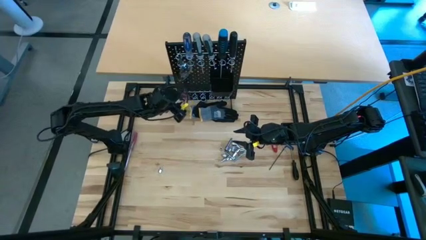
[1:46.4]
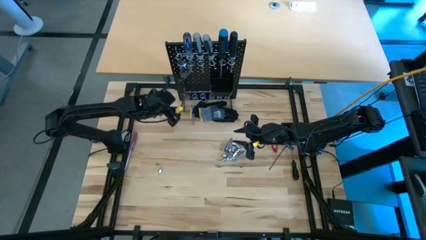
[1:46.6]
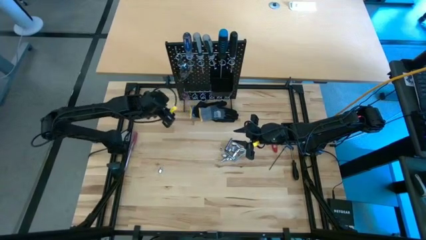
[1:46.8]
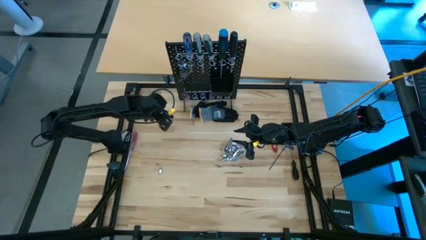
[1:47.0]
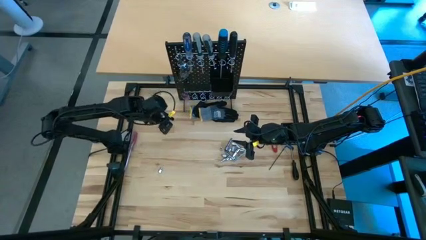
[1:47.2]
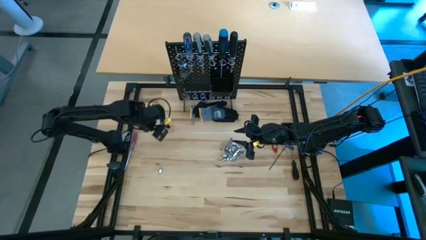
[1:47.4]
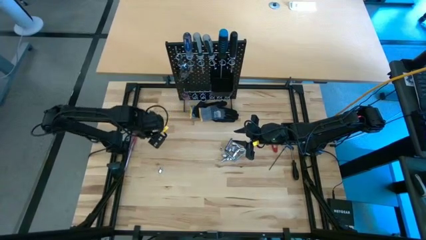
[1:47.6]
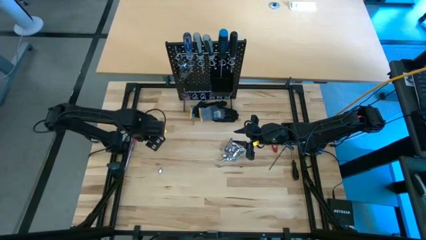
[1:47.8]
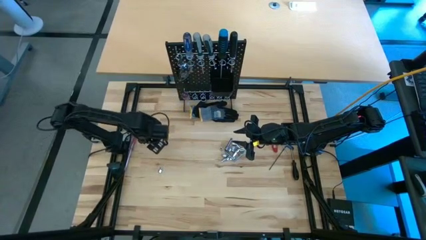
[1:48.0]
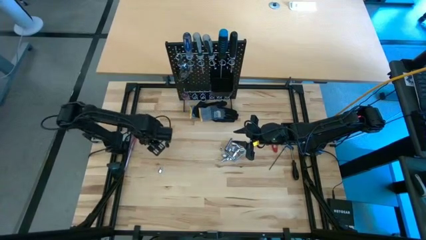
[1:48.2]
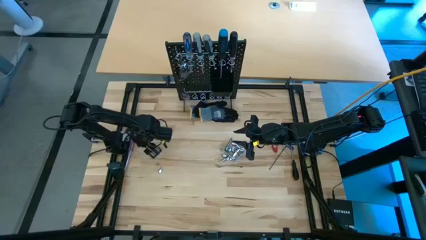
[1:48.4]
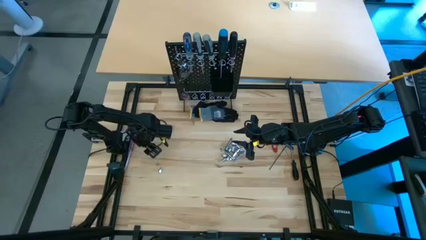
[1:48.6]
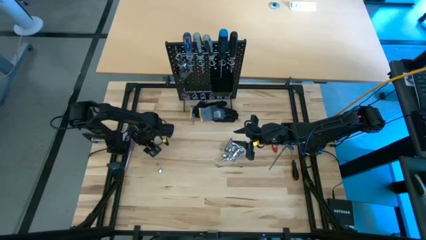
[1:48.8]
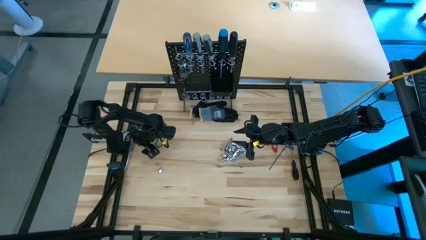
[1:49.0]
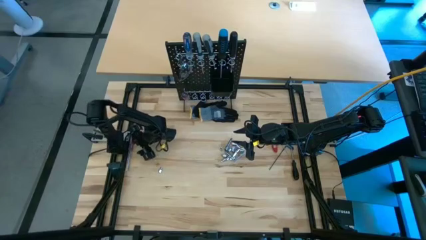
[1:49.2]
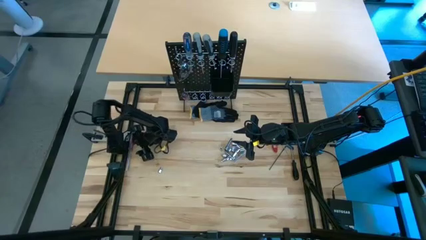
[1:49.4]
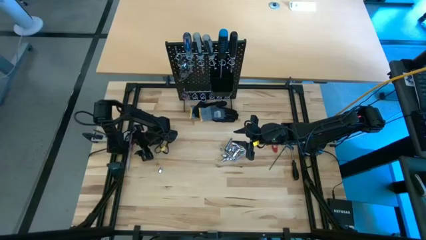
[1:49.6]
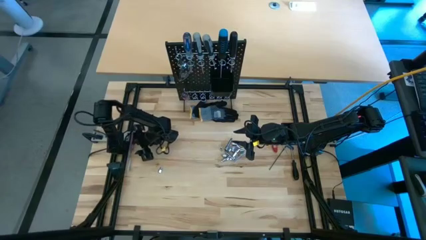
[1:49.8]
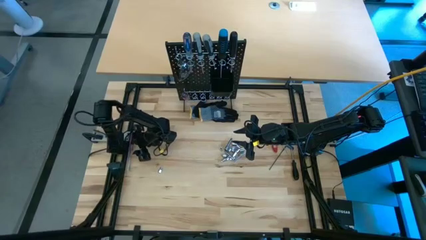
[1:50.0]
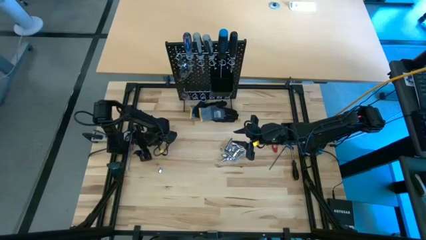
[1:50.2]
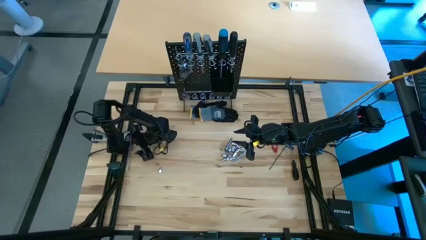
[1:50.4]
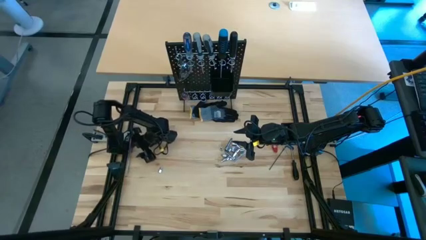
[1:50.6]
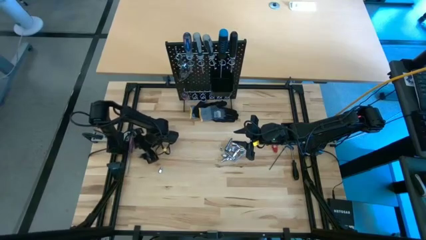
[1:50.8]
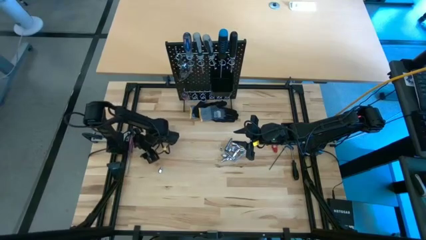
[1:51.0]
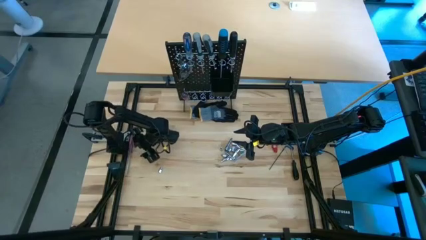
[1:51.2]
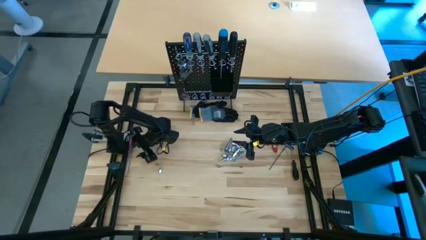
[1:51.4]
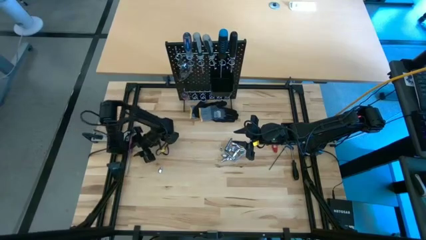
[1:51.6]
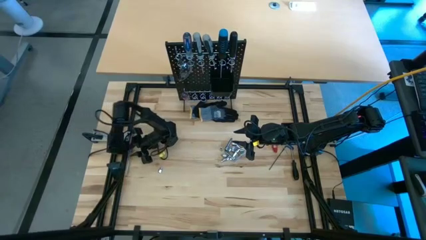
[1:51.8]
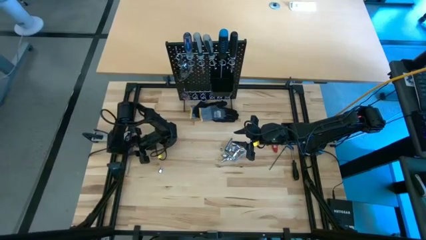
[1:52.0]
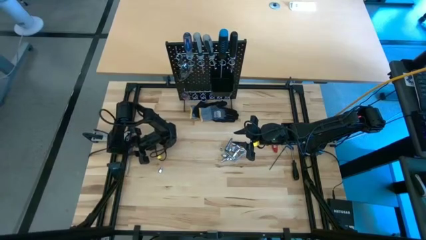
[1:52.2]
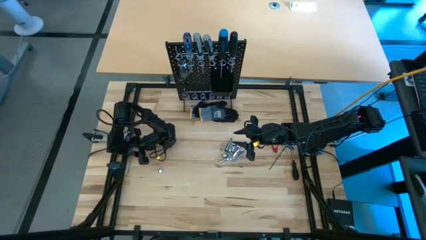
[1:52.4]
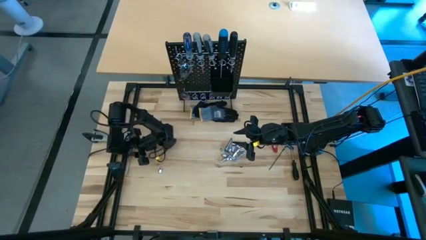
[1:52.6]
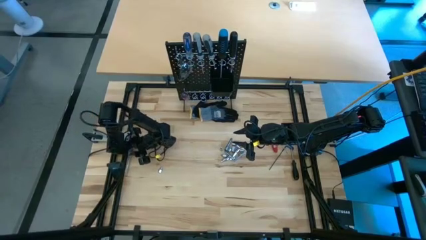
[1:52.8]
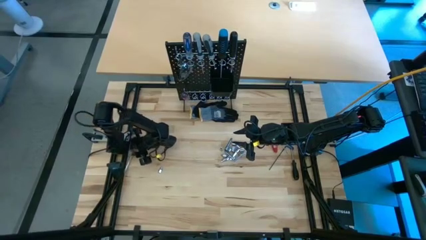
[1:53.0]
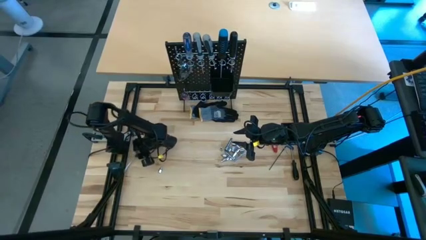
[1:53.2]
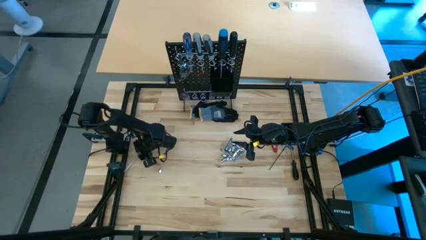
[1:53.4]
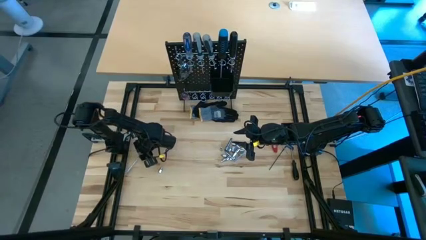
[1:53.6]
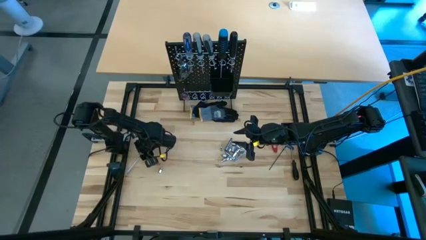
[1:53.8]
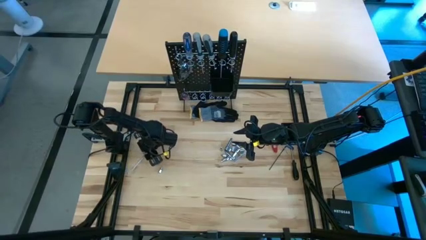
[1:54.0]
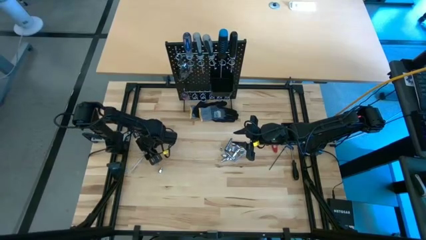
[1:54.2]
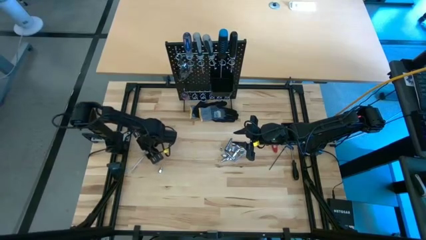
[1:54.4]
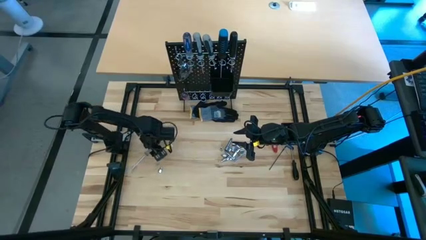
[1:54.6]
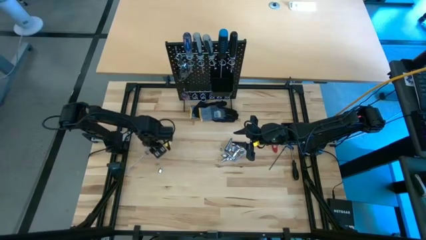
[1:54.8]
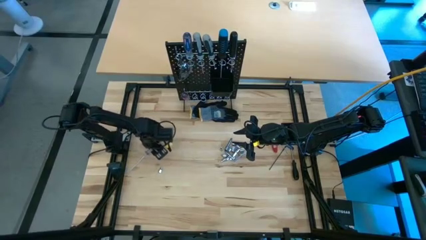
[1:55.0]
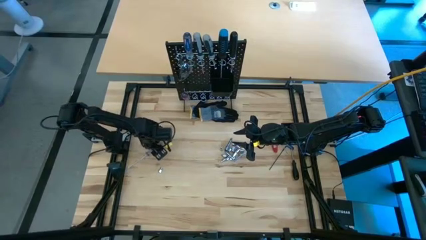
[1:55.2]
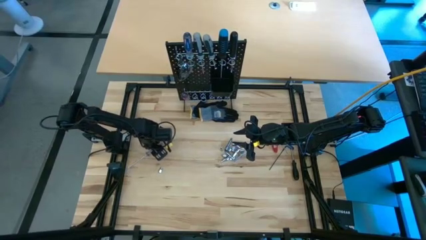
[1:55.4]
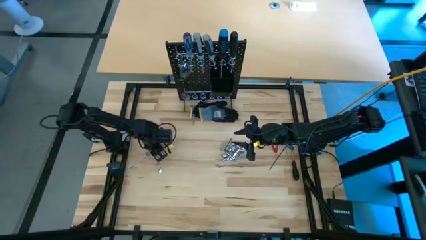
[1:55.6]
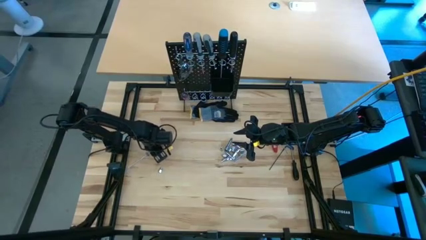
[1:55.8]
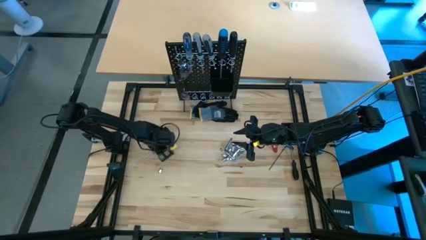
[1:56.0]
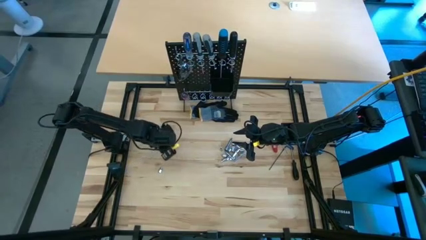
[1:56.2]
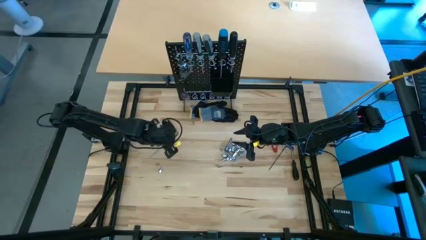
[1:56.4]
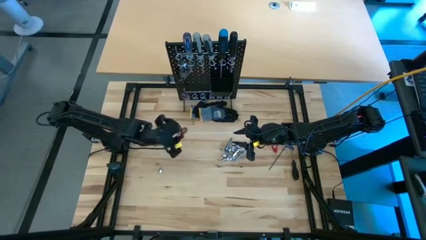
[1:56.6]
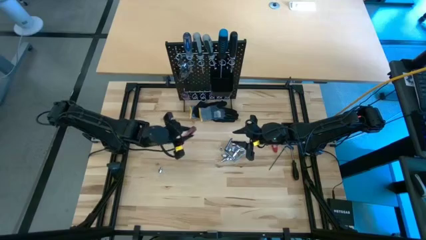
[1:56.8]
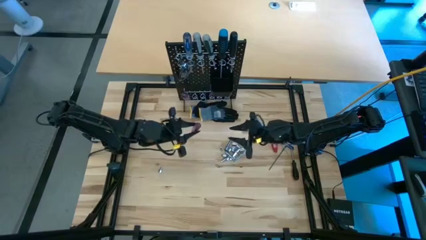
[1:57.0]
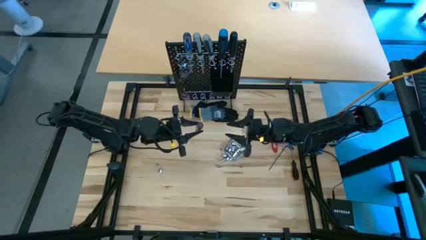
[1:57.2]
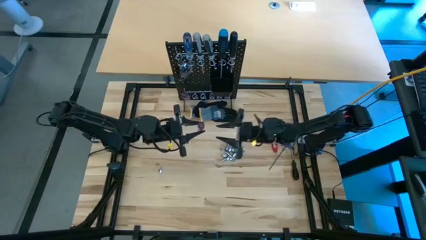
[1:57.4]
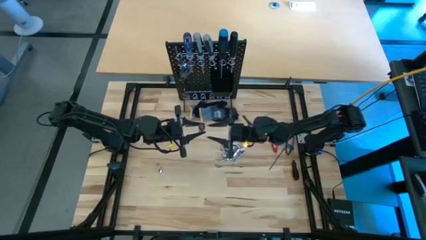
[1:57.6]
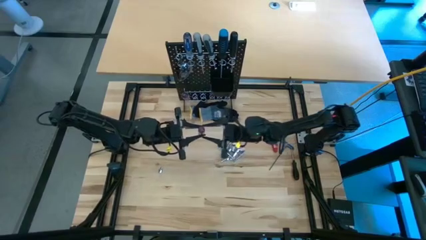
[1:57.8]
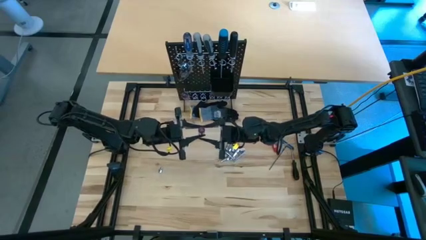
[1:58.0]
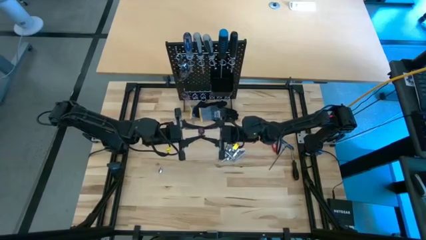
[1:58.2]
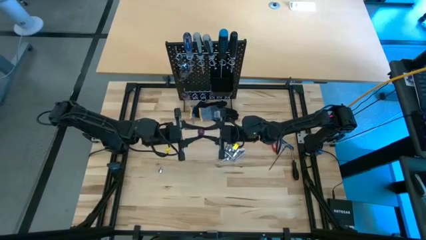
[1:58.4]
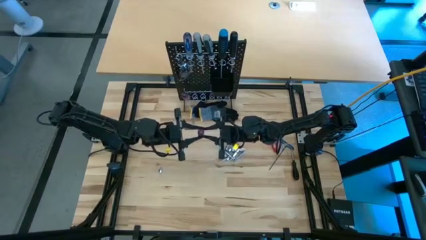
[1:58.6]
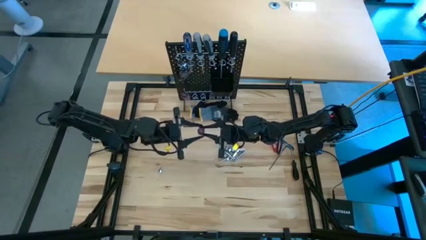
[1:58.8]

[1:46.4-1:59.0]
Task: Hang tools onto peg board
Hang the red screwdriver on the pegboard

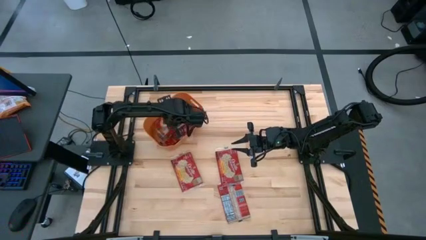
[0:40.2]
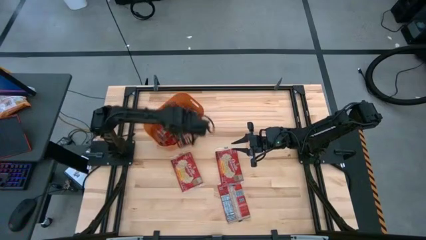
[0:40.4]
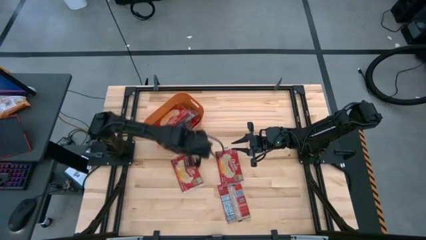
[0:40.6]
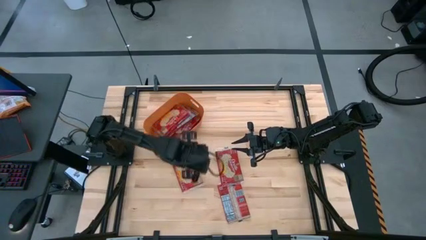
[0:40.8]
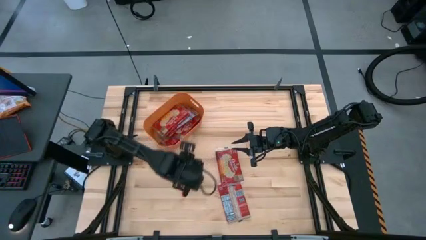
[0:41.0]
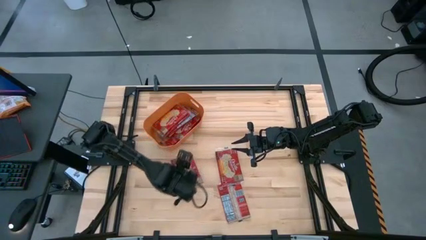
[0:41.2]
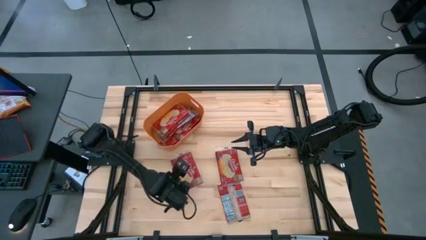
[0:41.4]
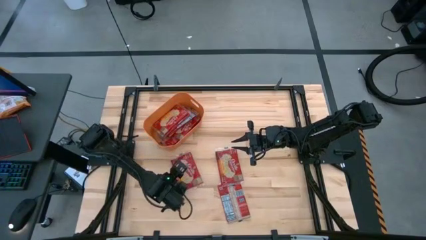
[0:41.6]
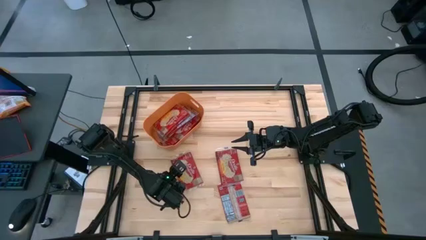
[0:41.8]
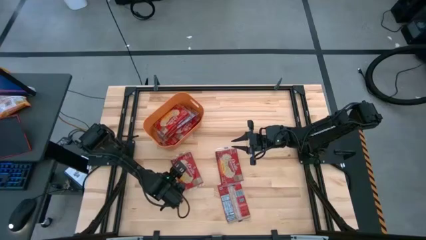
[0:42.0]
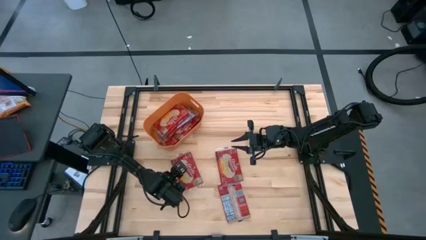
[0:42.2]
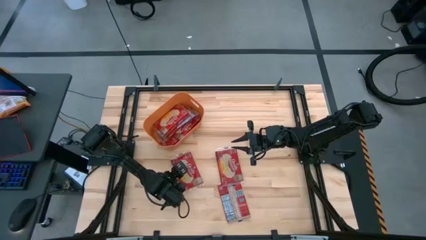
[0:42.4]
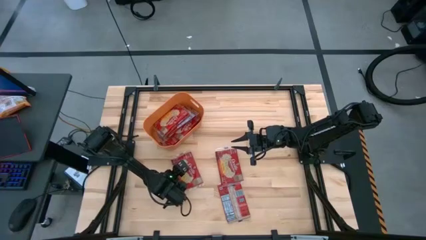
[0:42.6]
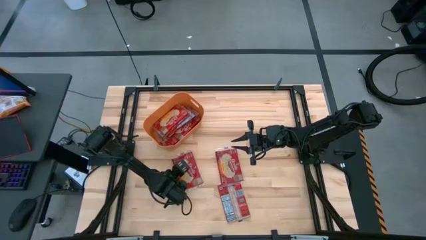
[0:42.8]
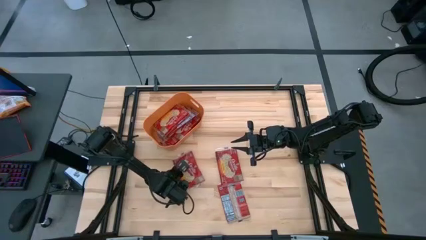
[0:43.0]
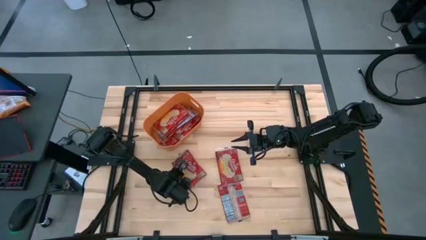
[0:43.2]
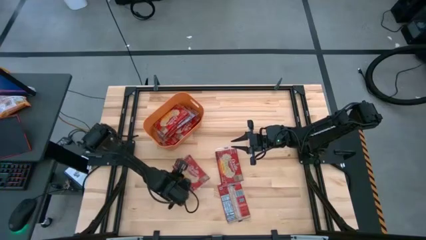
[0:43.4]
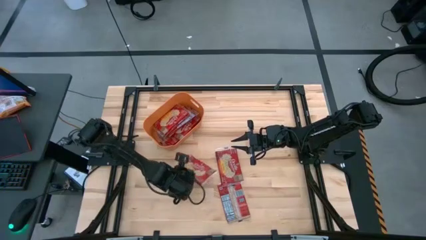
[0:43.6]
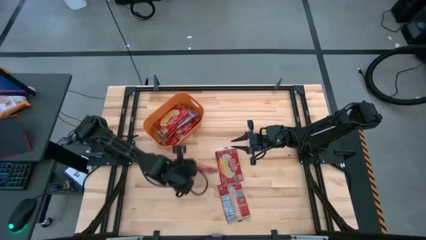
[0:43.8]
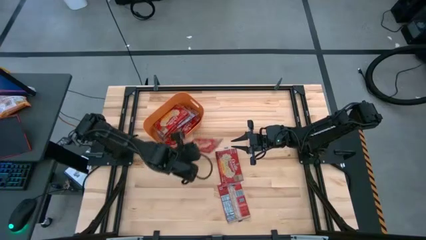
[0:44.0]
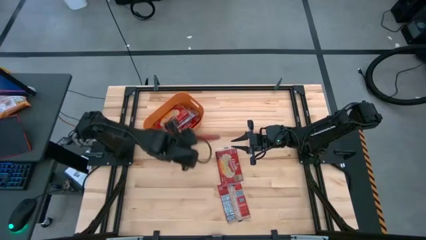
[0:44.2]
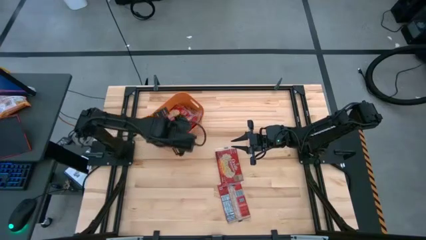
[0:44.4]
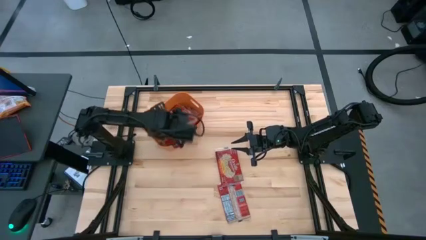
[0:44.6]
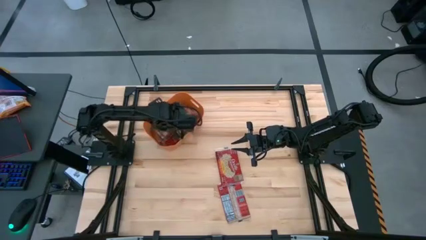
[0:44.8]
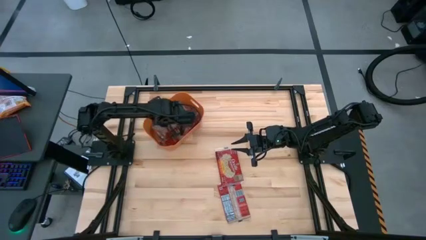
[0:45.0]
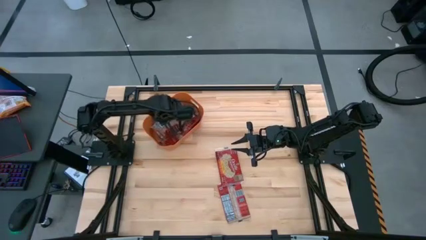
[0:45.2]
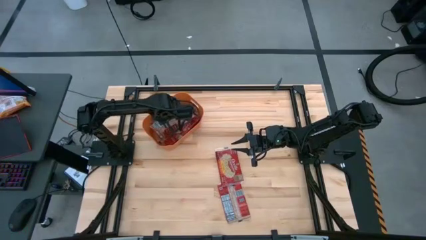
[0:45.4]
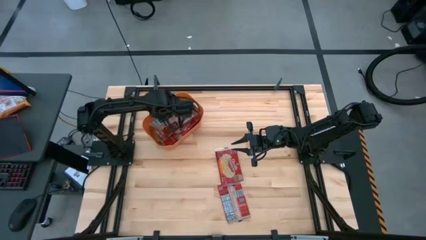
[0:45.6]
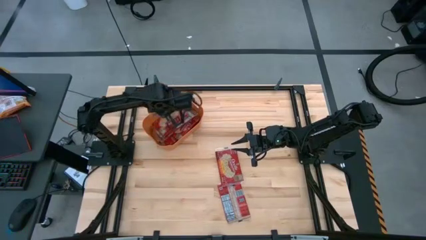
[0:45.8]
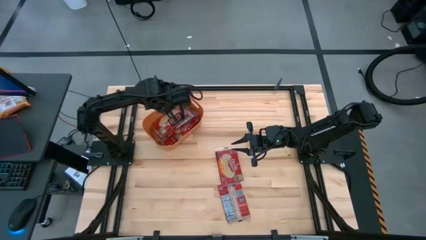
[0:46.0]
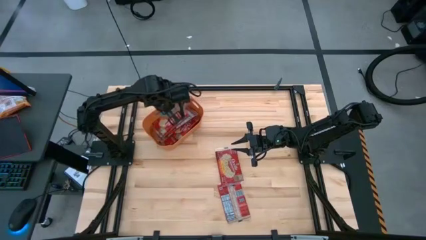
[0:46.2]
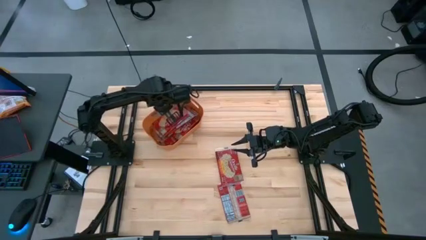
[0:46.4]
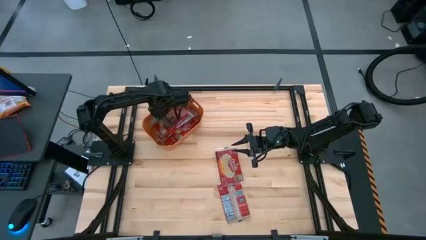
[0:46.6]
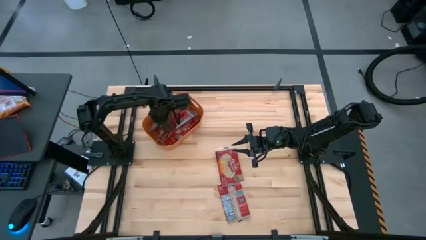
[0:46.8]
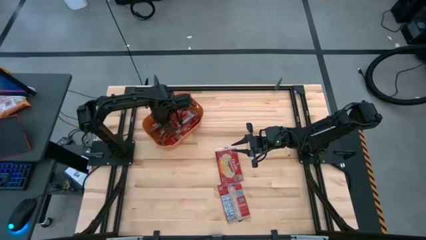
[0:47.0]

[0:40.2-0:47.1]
Task: Sort popcorn bags into baskets
Put the red popcorn bag into the orange bin
